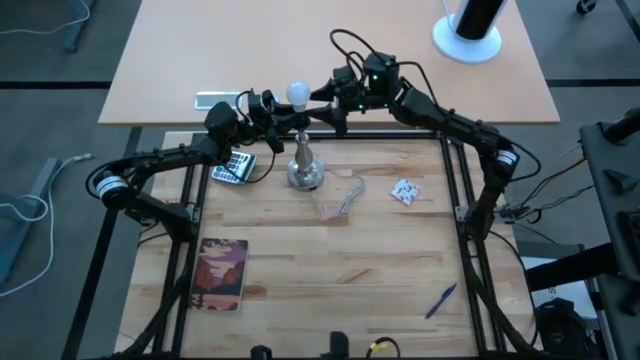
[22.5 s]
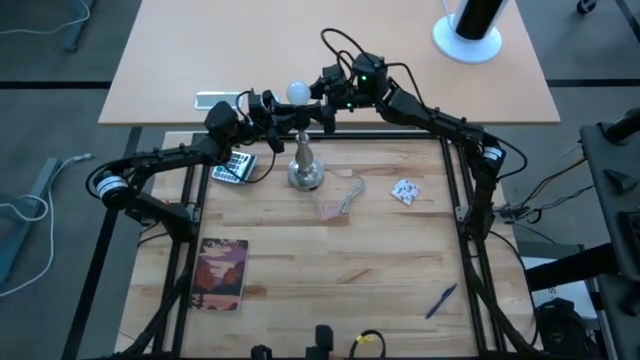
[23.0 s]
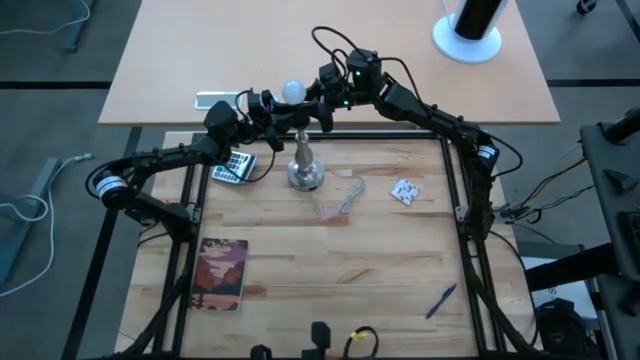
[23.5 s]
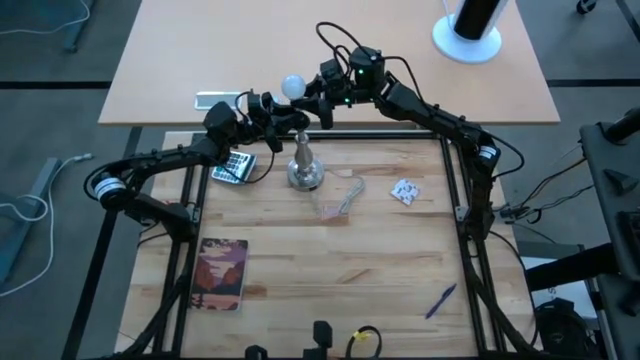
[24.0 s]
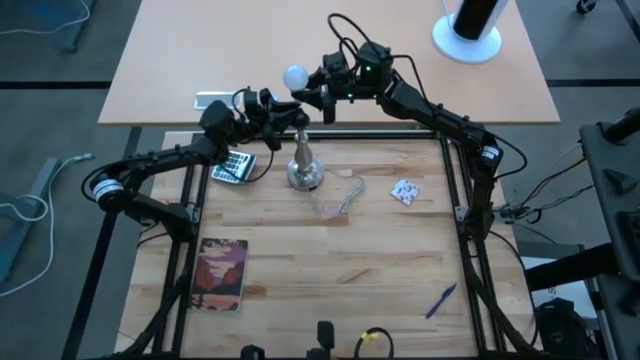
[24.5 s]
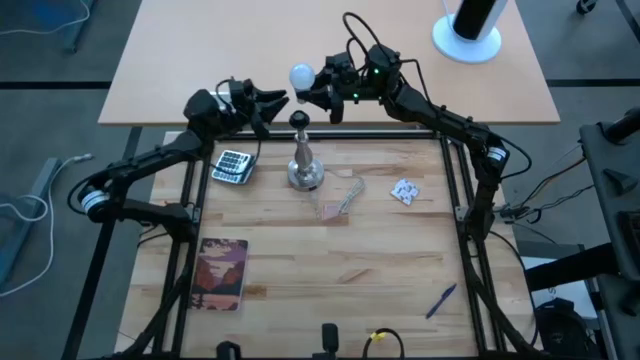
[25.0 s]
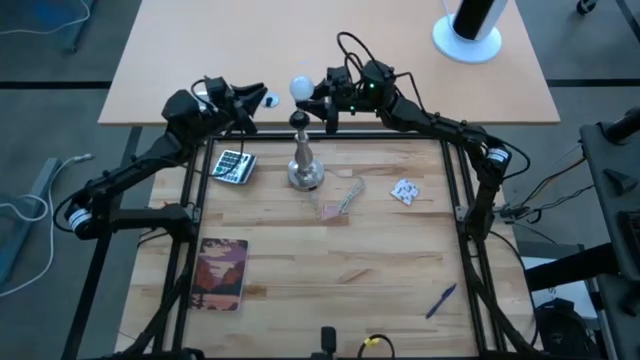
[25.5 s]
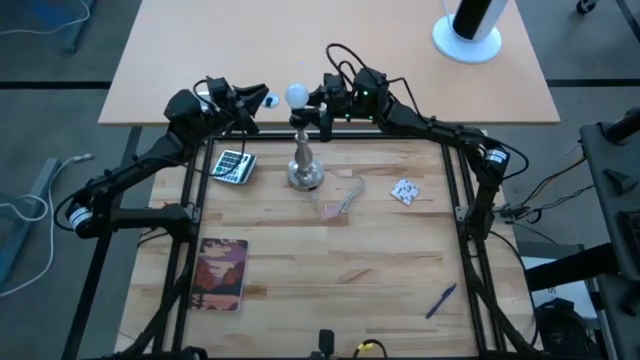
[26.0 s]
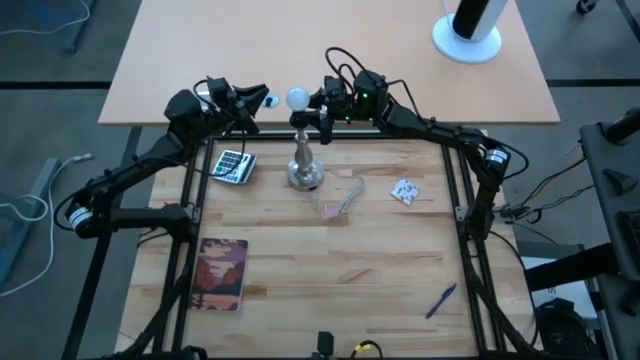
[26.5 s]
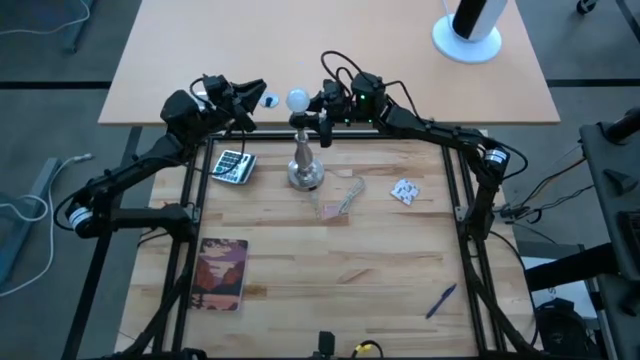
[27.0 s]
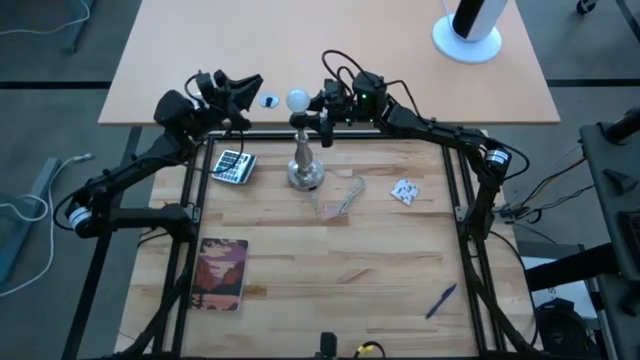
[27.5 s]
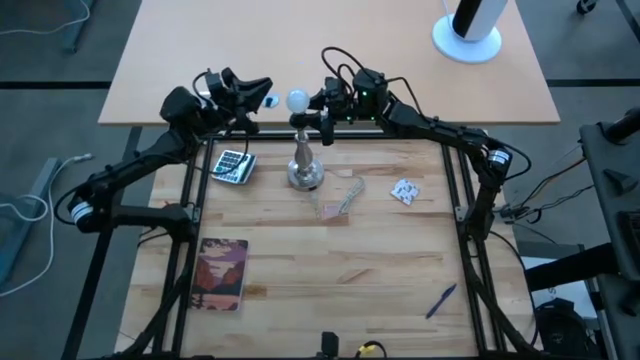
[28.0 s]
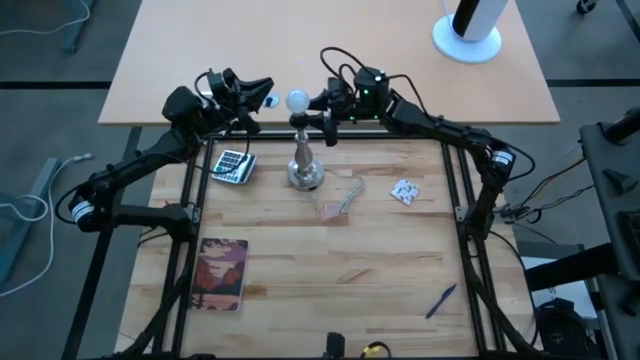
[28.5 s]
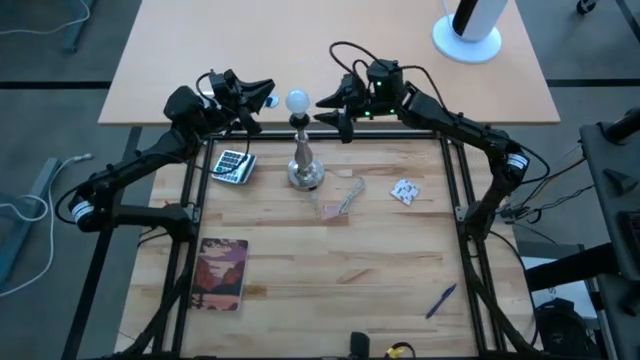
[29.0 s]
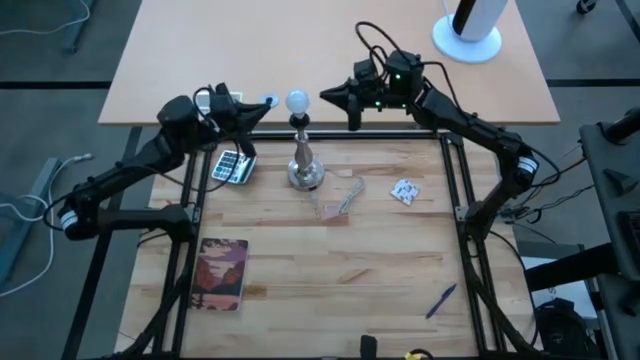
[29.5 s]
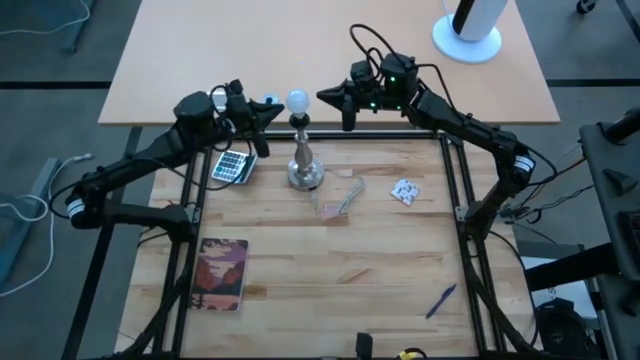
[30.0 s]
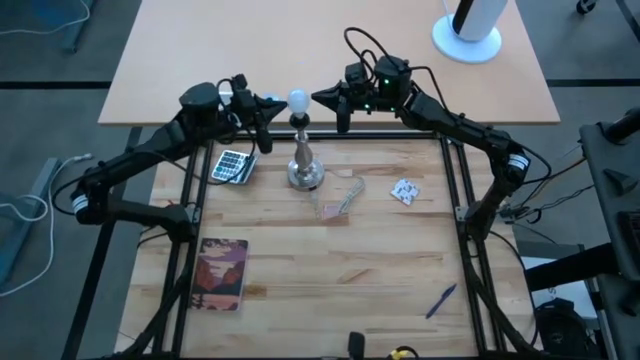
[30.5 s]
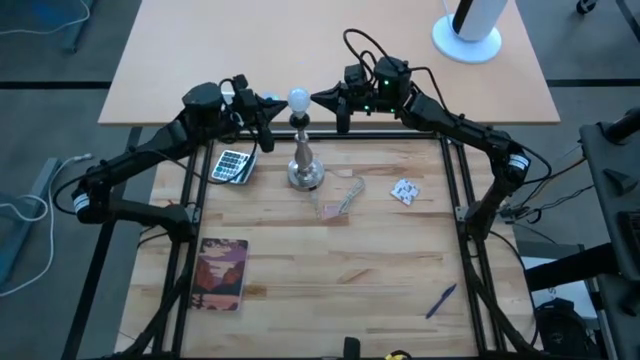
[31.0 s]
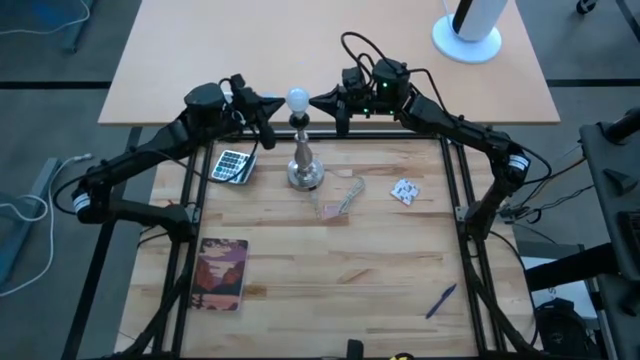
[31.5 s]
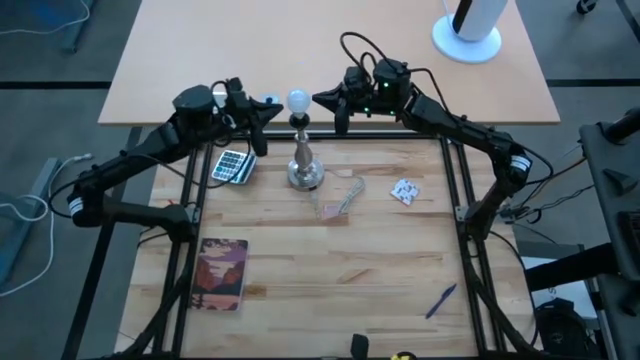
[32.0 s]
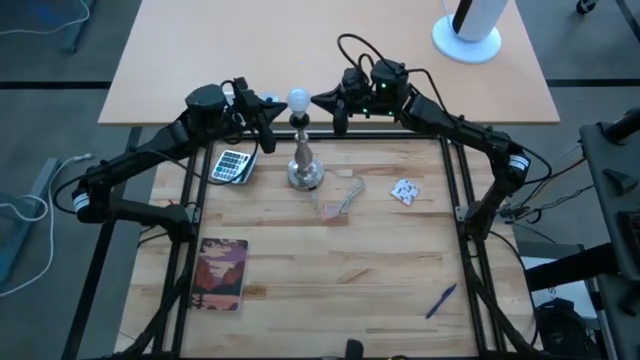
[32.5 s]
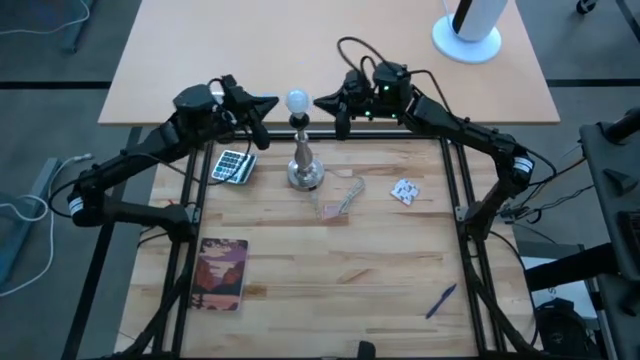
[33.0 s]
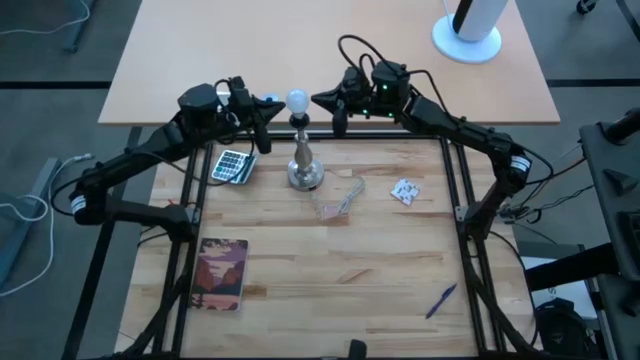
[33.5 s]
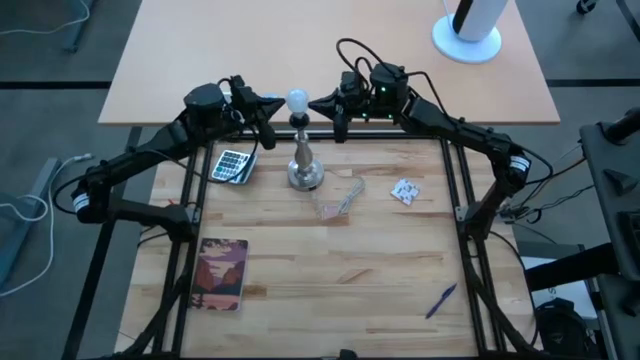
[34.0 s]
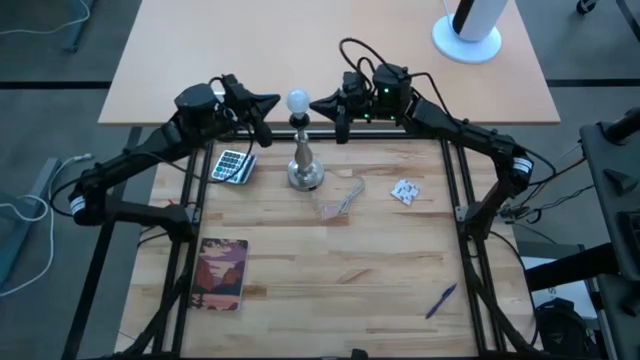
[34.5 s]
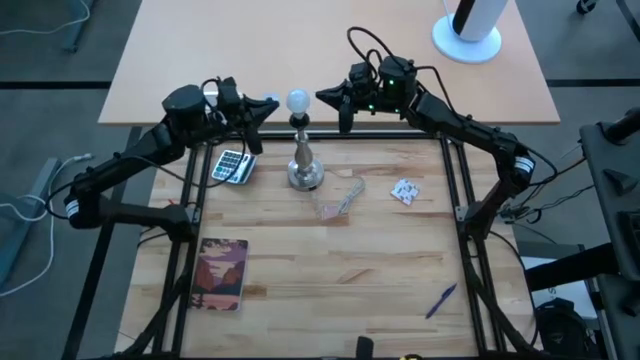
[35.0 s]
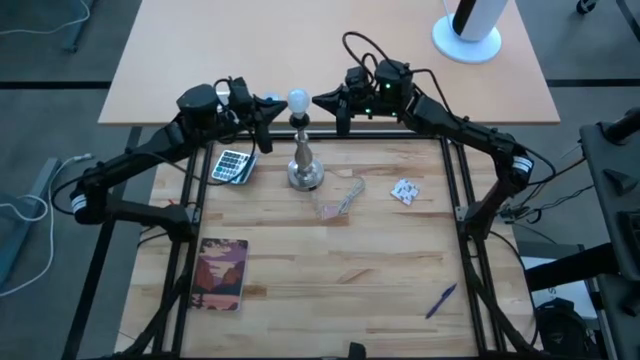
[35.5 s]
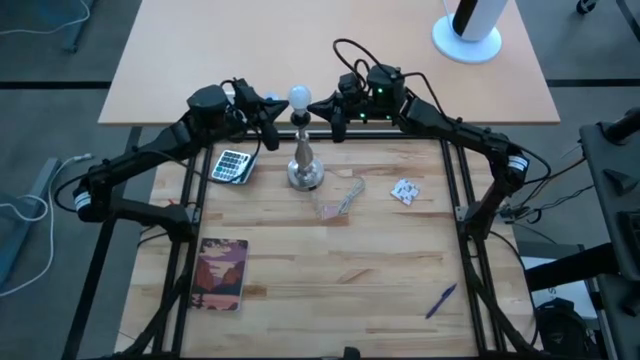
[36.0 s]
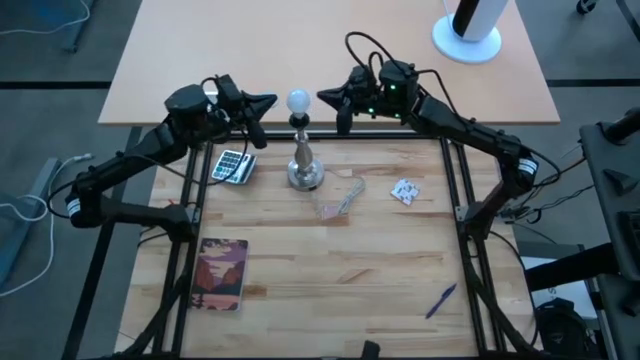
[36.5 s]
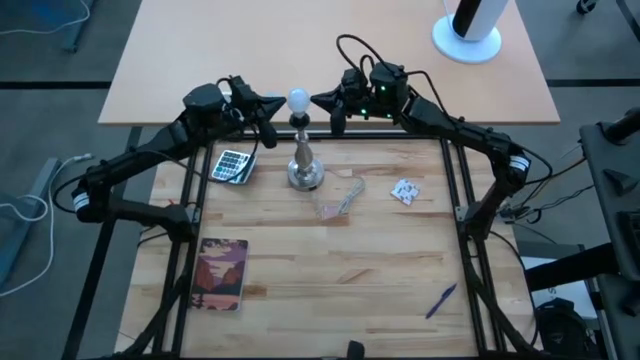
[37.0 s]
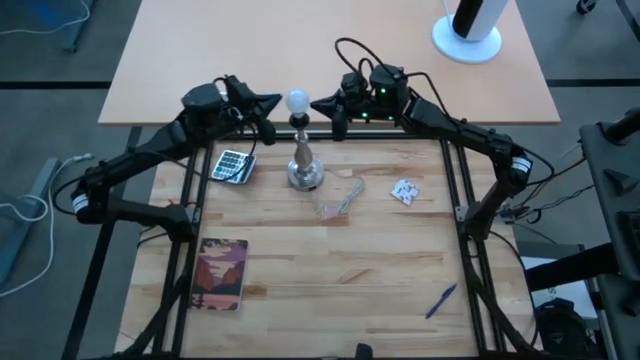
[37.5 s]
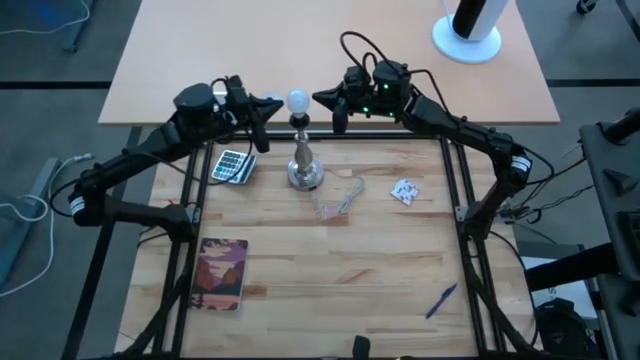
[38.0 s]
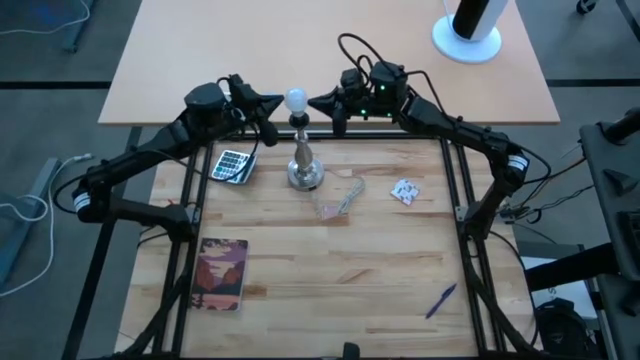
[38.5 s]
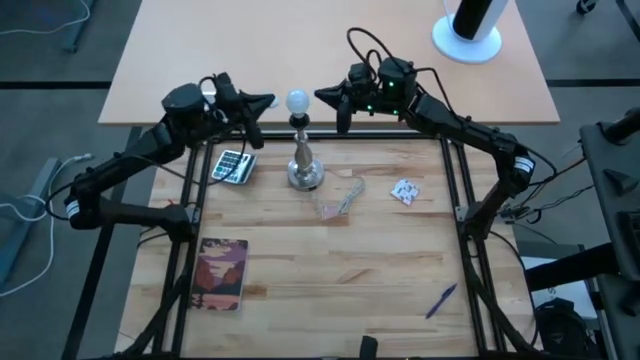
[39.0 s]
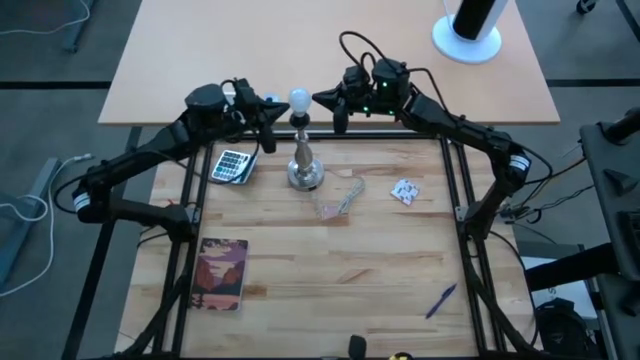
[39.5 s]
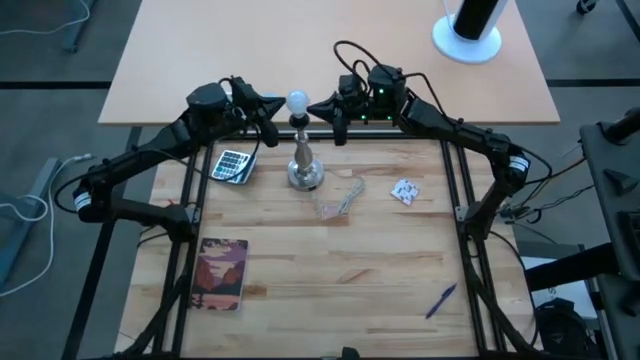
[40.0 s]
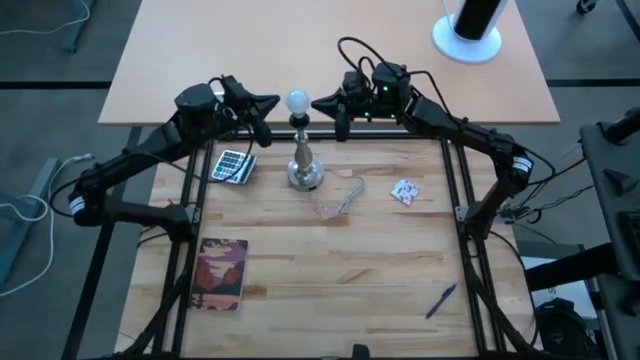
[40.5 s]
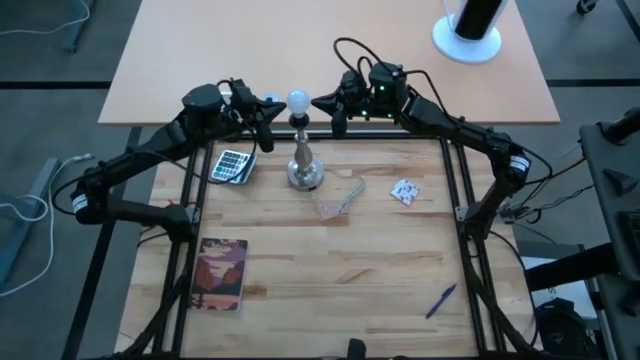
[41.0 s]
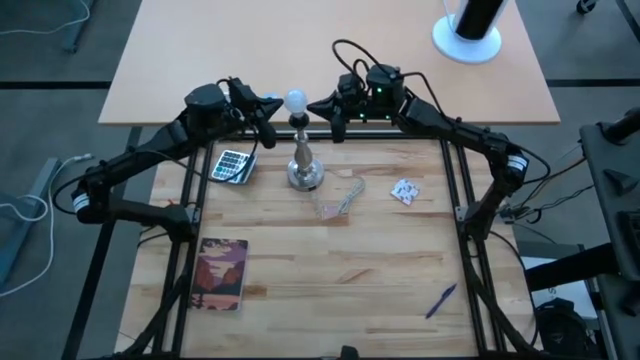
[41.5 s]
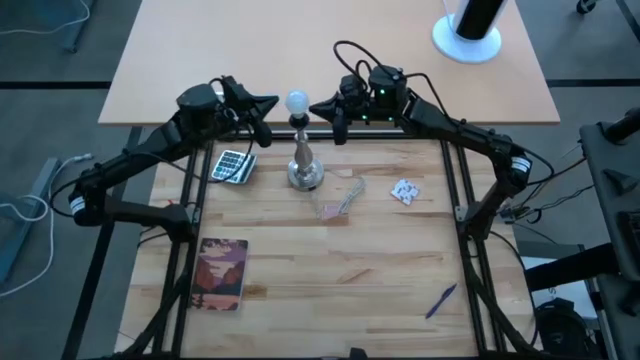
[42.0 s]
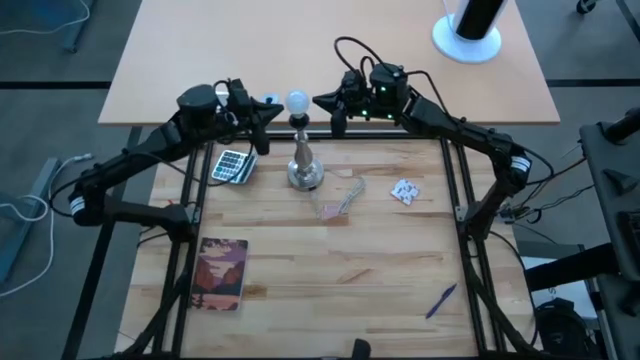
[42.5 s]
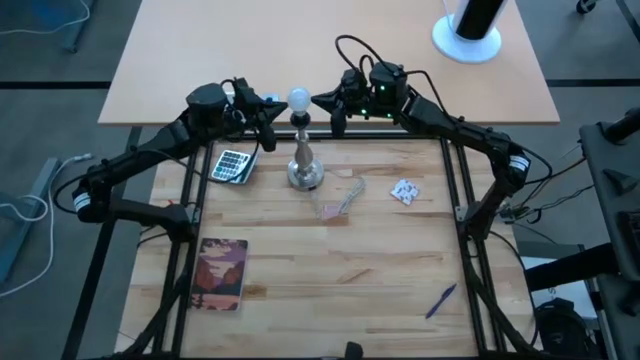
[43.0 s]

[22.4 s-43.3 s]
Task: Screw lightbulb
Insert the lightbulb into the lamp
